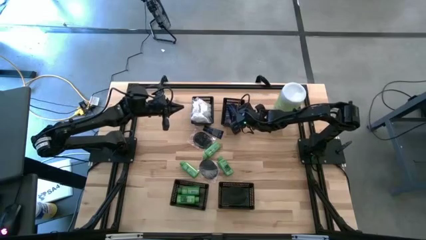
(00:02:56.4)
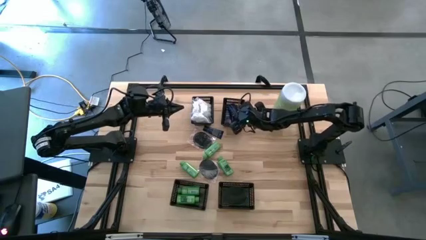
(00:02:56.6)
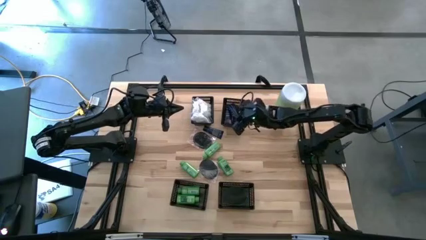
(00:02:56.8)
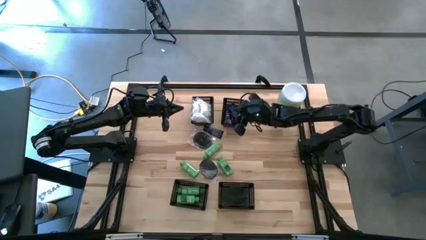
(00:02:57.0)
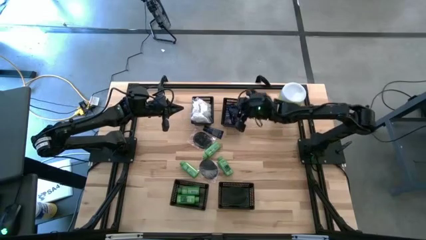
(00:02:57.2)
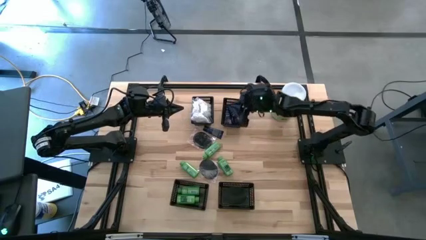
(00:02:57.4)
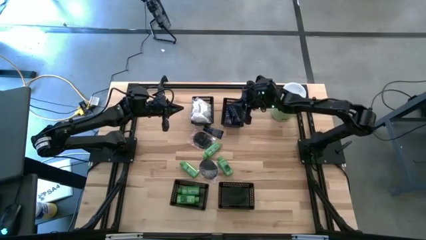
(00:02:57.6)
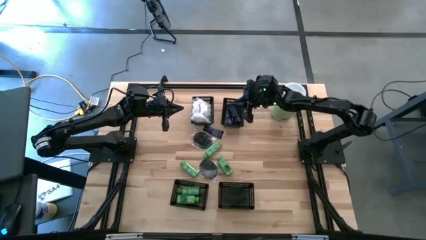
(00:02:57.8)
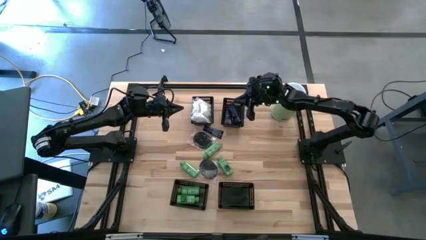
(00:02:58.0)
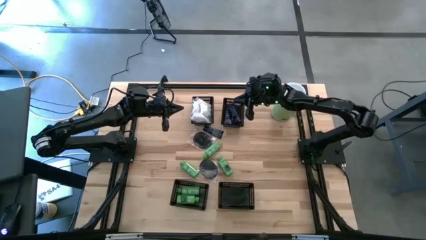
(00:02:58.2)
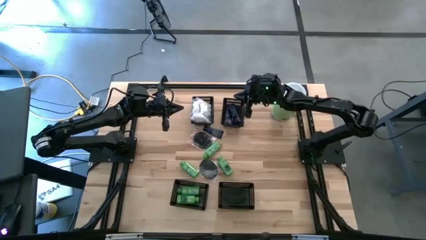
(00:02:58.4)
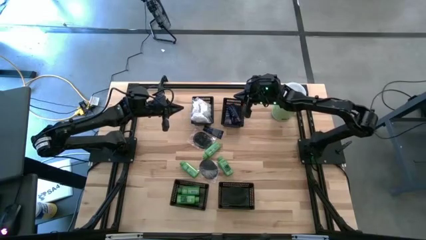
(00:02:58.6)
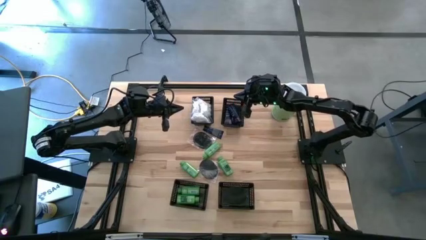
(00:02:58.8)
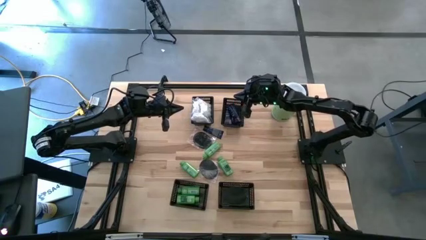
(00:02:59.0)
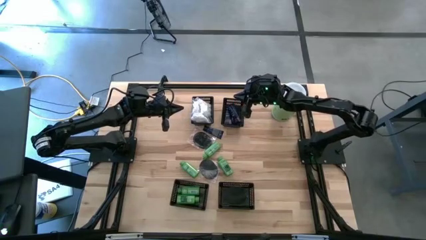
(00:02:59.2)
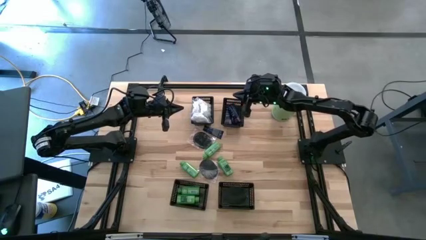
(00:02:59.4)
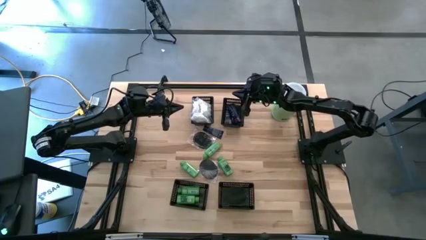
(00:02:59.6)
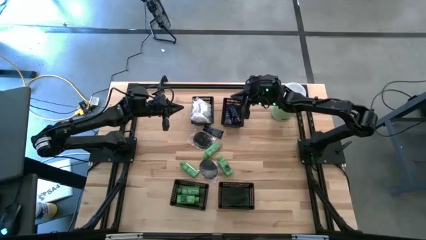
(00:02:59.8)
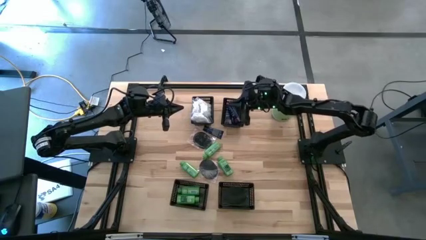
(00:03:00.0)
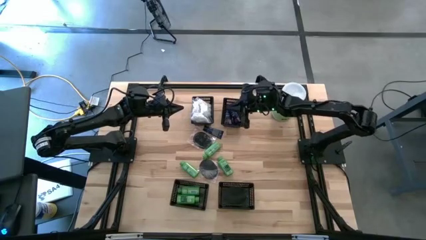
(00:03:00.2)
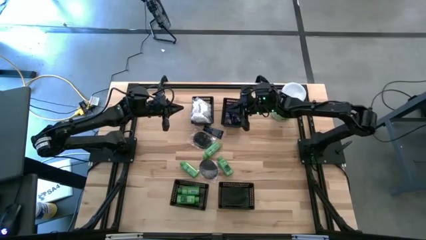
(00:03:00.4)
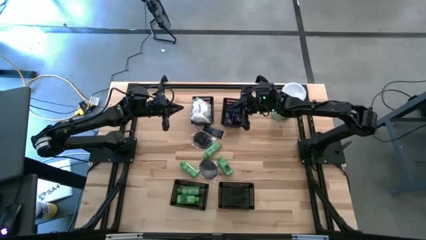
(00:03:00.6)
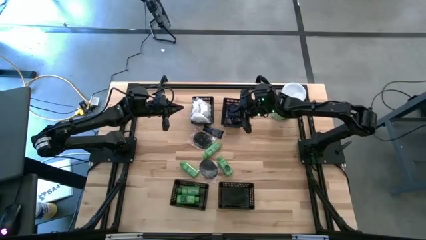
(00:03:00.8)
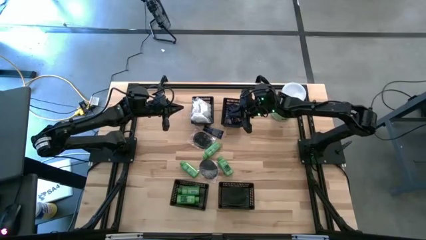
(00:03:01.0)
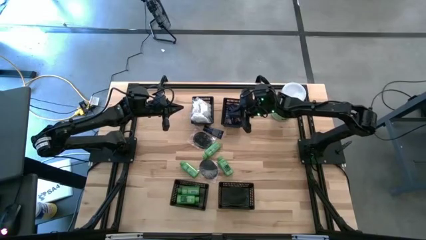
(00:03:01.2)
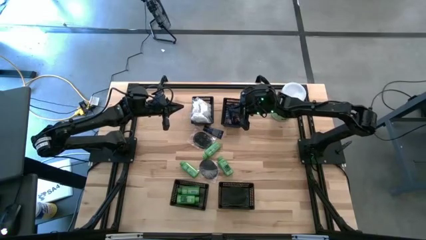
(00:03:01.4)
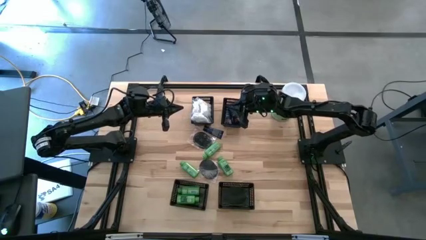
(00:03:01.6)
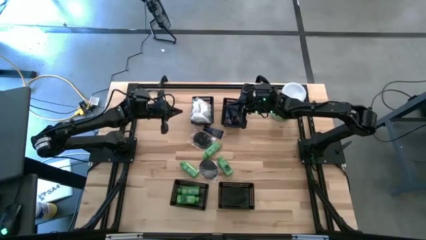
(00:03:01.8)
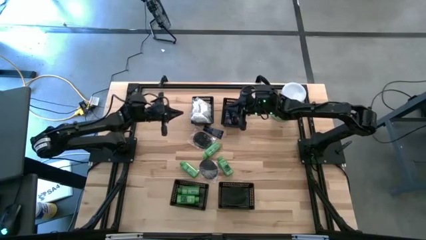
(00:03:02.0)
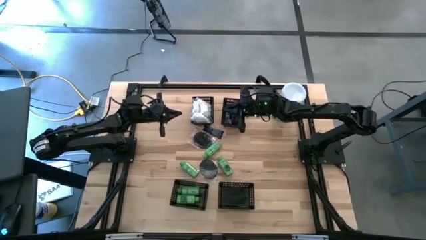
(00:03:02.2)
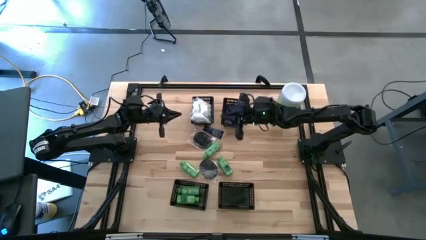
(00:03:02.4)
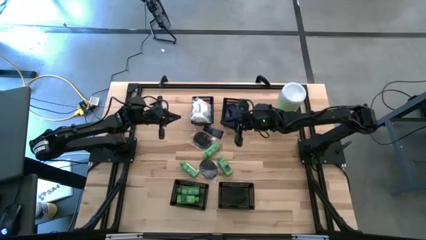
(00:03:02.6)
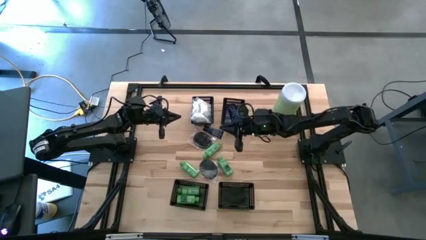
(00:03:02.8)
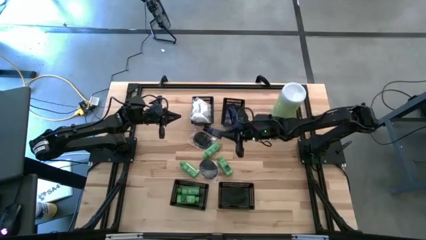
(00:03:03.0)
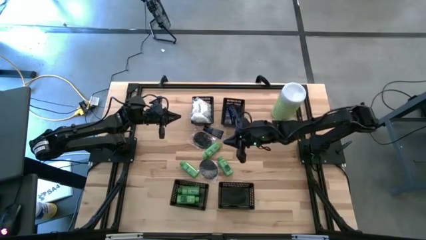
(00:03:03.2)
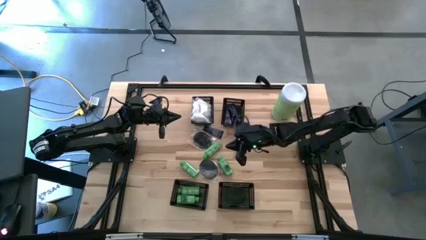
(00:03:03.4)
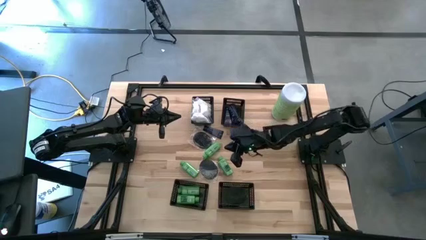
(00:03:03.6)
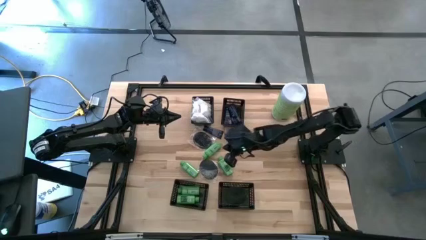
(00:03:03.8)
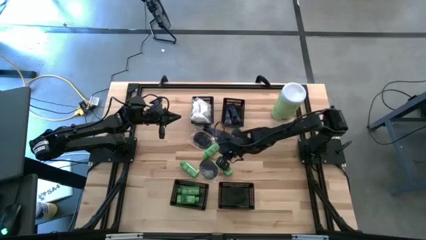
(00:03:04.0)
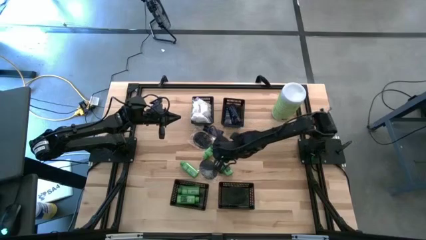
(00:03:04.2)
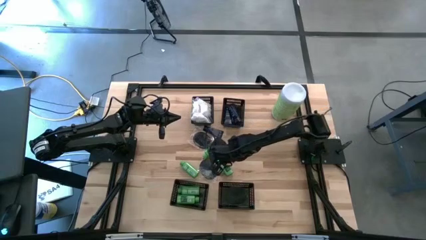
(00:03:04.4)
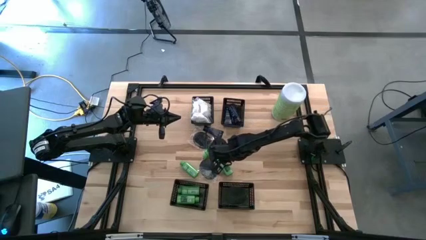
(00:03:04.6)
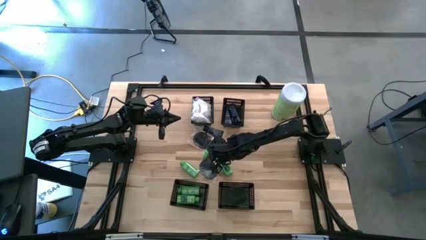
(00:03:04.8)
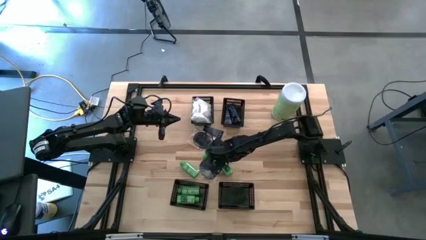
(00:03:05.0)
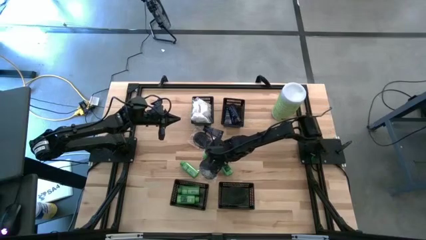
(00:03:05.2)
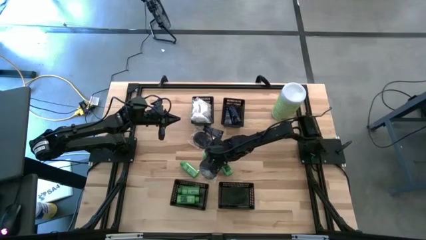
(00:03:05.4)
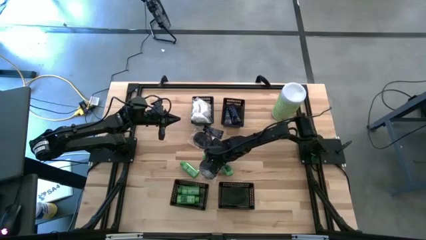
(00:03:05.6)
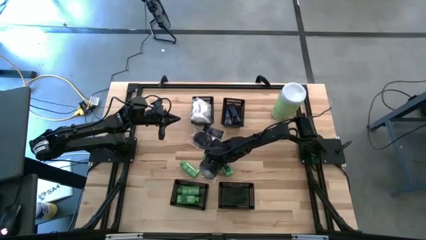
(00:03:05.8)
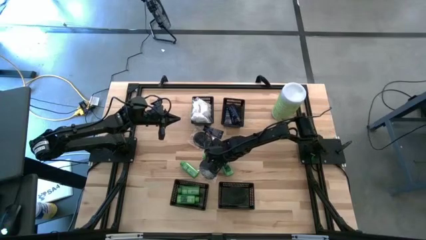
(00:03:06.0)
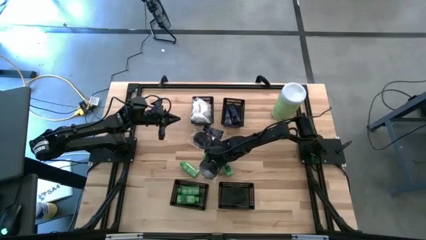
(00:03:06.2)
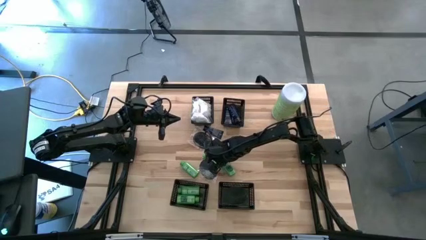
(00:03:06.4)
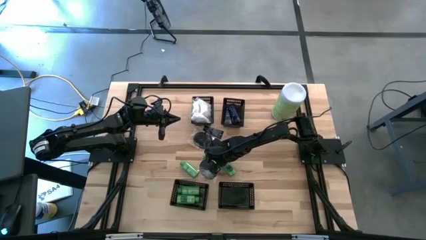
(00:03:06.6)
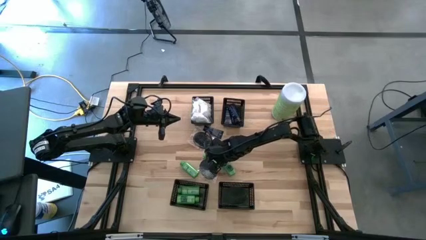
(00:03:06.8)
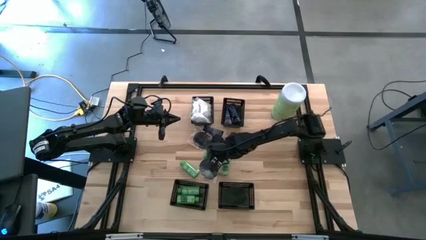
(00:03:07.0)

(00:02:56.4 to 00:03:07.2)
Task: Pick & Place Travel size toiletries
Put the green shampoo into the bottom left black bin

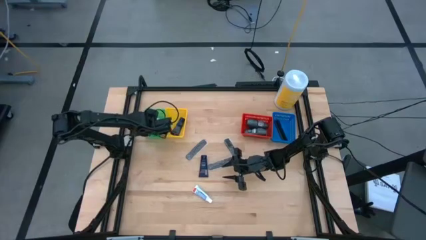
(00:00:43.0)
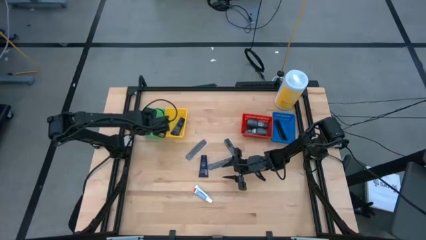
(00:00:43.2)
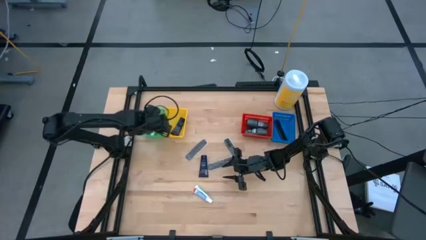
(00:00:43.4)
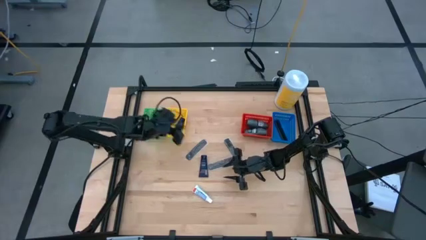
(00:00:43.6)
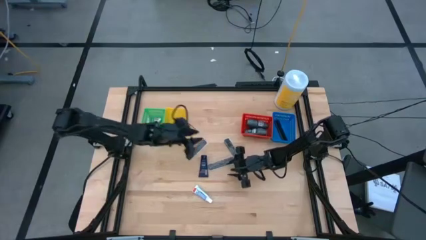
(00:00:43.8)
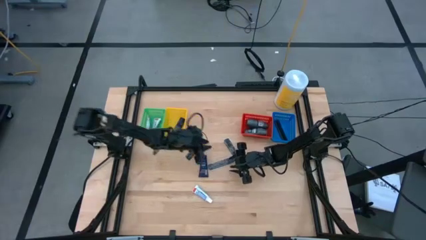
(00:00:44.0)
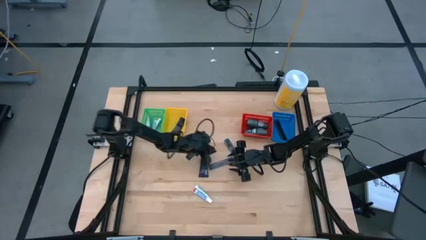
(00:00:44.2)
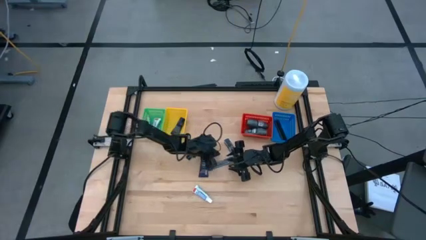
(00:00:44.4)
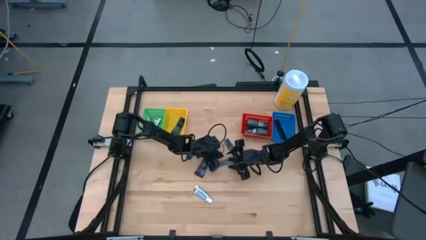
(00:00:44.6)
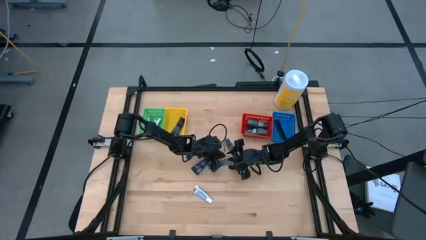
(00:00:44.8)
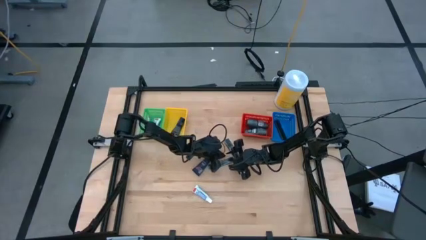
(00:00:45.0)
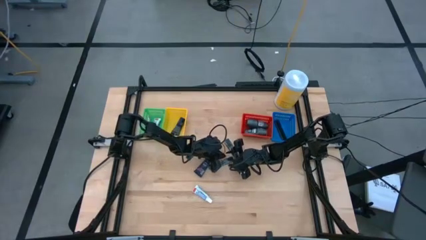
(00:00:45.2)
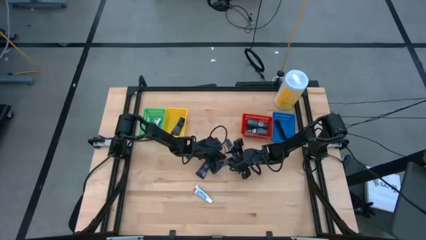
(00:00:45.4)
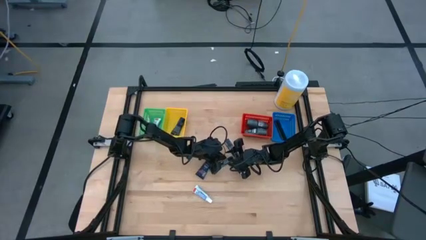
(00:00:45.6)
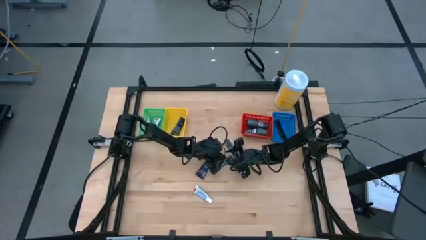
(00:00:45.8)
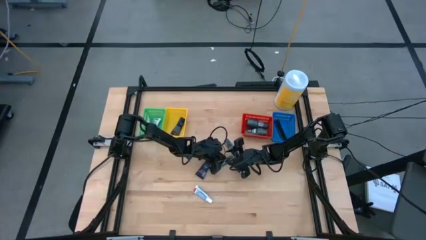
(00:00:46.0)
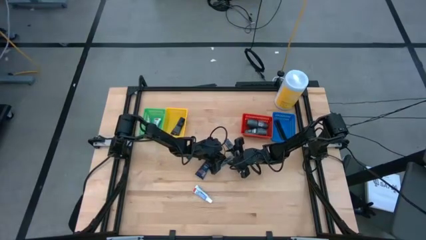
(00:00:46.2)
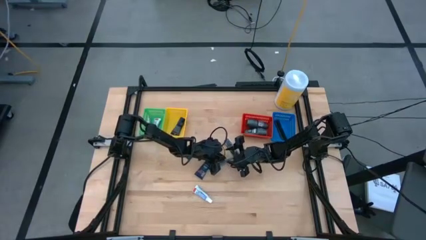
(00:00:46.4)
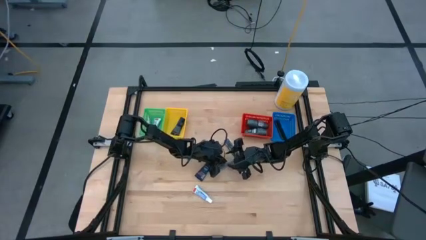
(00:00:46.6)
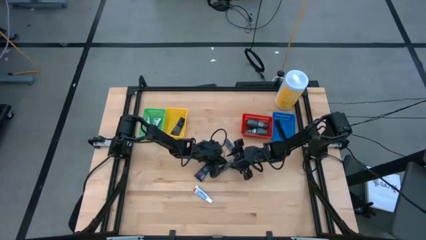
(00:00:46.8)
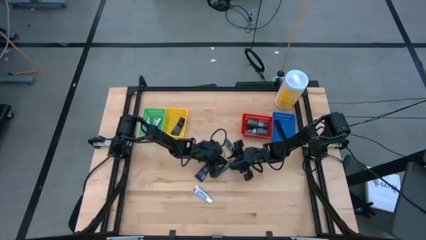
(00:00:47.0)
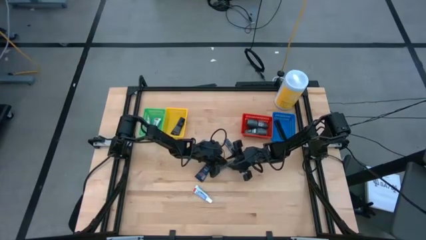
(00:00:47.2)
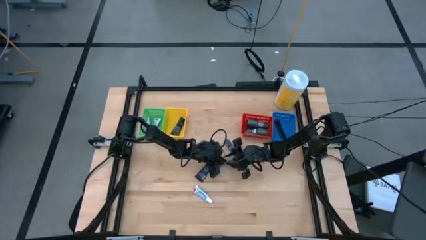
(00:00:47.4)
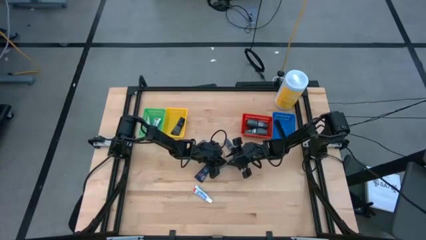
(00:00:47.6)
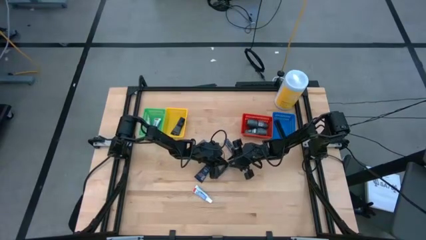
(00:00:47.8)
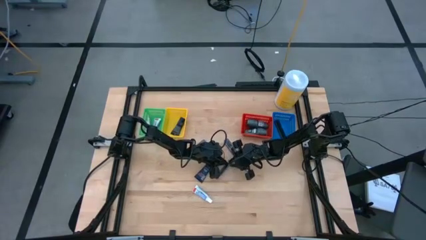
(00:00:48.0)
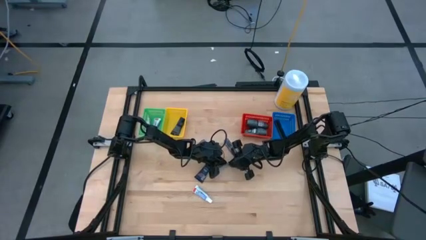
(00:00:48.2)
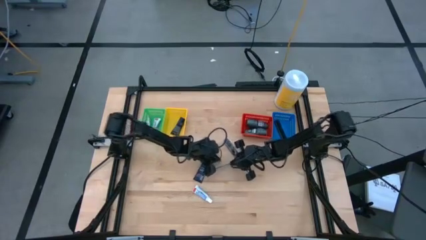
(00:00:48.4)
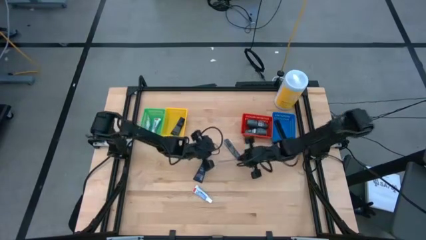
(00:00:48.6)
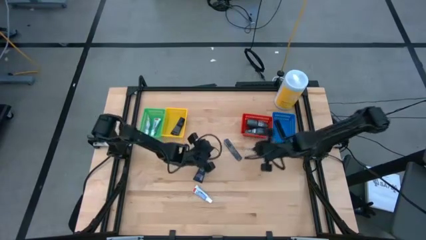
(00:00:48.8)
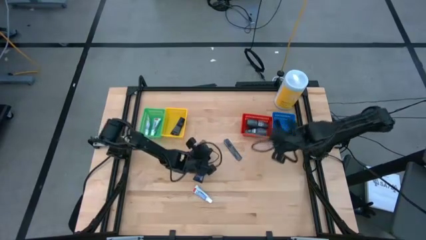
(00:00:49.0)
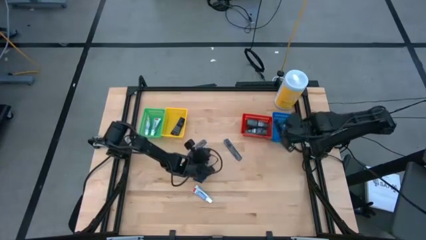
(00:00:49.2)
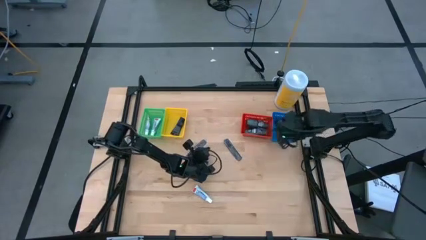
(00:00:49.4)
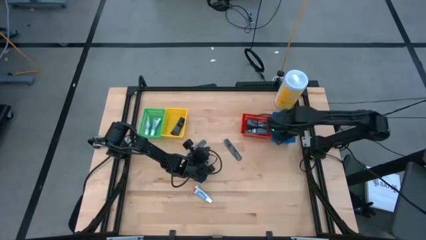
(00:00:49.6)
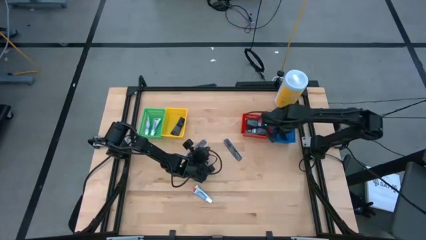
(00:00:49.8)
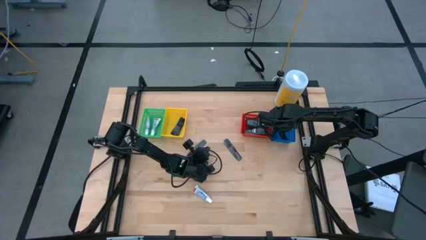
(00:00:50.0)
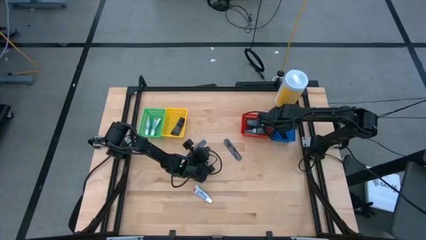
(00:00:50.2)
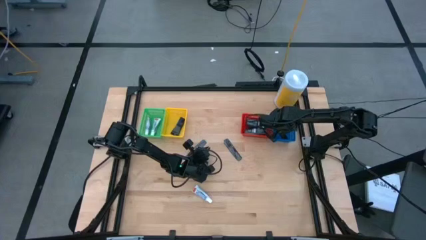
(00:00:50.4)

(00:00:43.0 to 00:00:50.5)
Task: Pick & Place Travel size toiletries
Put the comb into the blue bin
